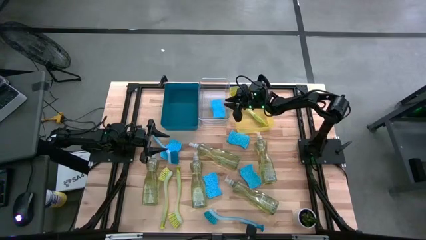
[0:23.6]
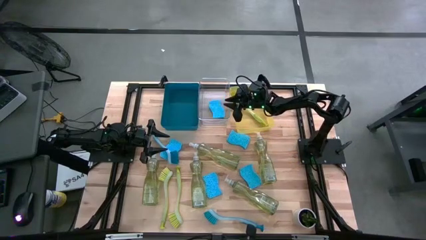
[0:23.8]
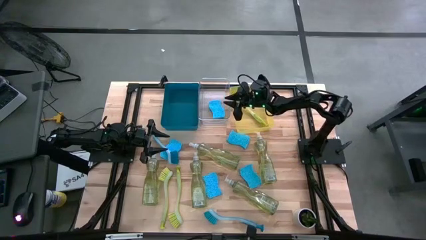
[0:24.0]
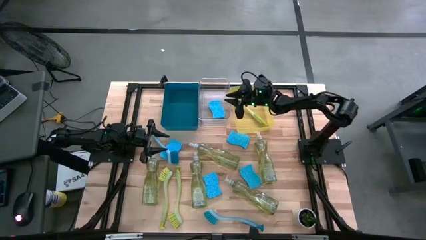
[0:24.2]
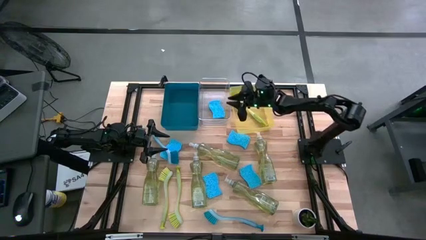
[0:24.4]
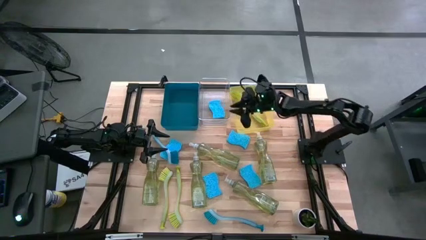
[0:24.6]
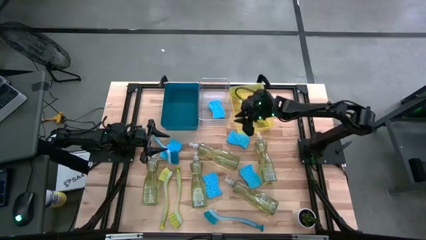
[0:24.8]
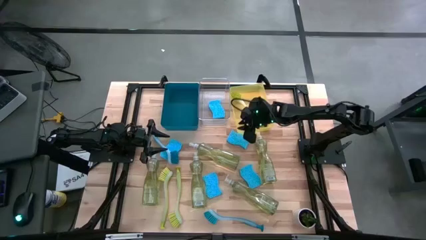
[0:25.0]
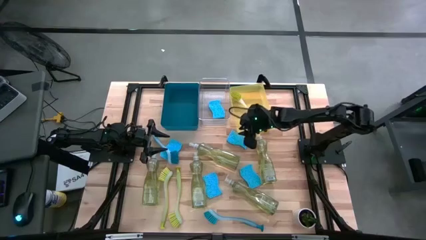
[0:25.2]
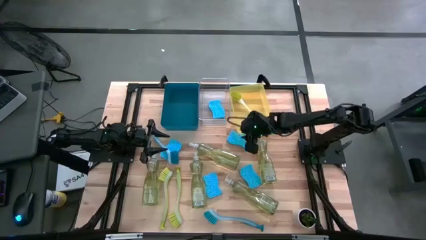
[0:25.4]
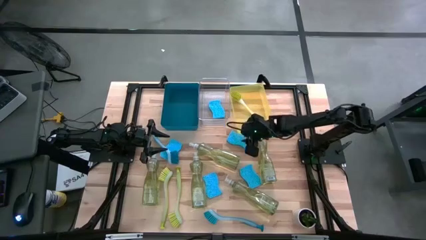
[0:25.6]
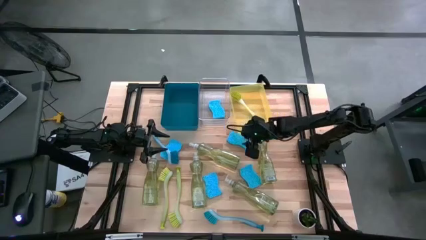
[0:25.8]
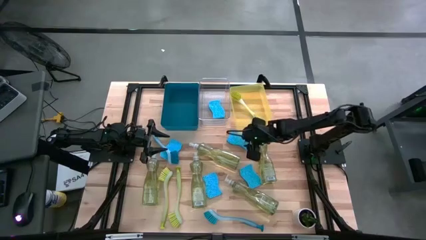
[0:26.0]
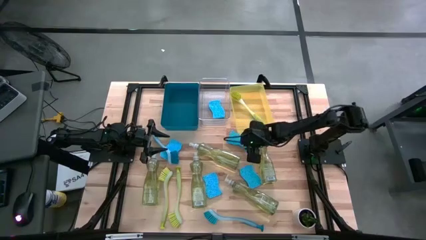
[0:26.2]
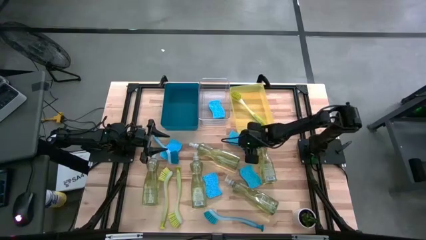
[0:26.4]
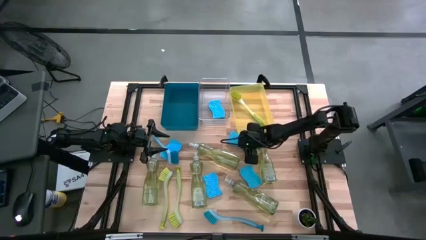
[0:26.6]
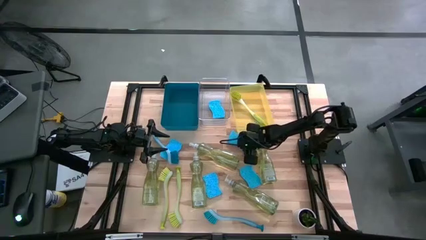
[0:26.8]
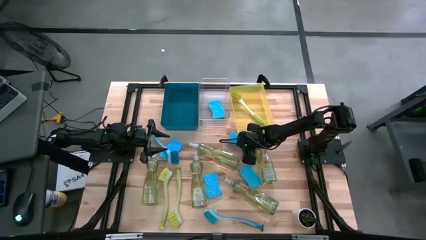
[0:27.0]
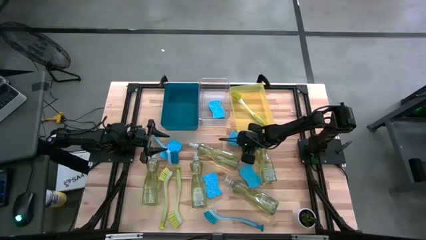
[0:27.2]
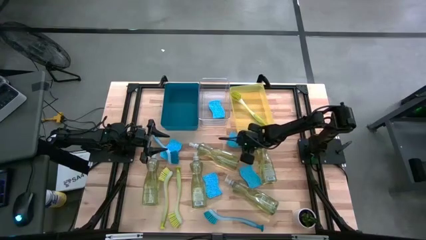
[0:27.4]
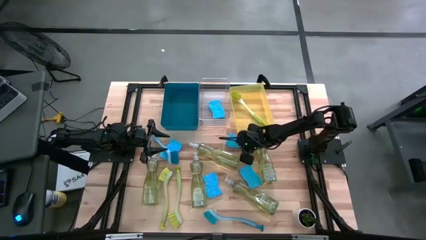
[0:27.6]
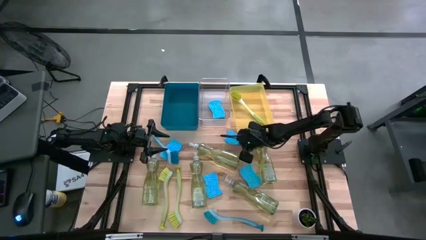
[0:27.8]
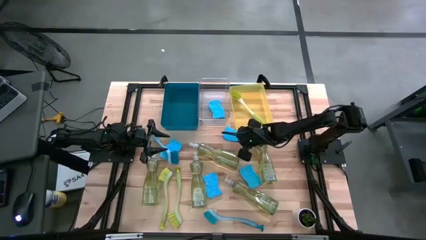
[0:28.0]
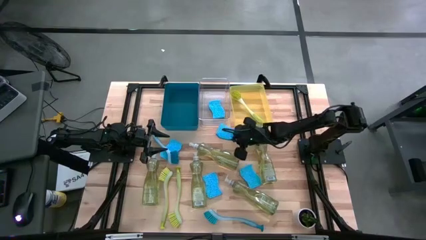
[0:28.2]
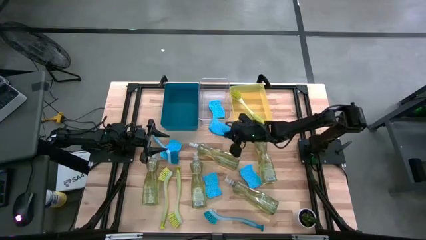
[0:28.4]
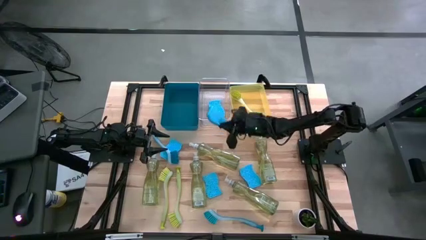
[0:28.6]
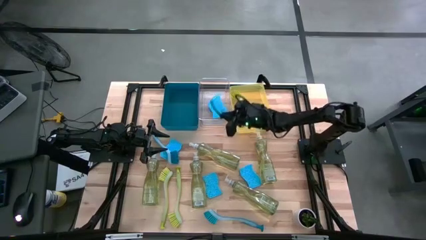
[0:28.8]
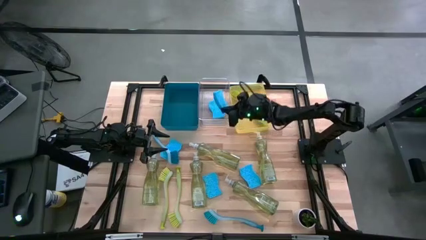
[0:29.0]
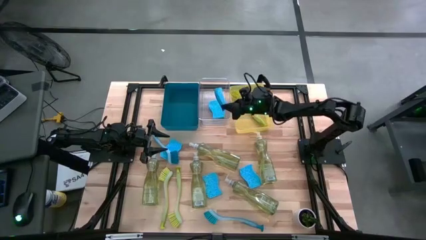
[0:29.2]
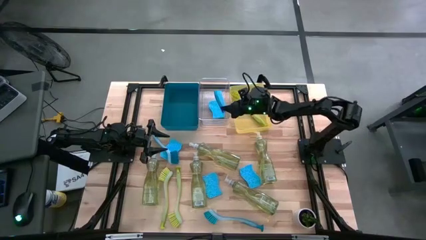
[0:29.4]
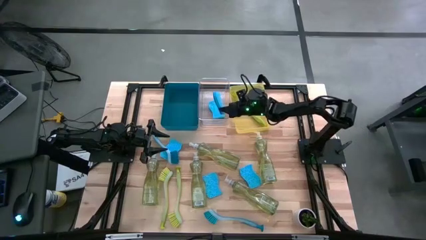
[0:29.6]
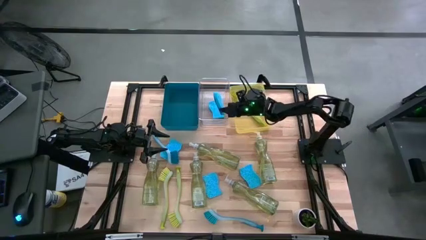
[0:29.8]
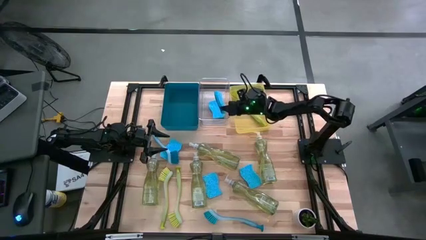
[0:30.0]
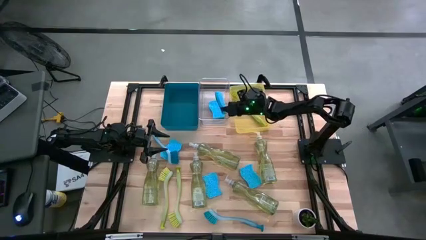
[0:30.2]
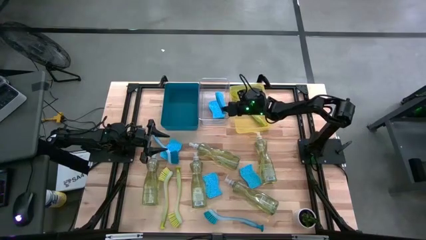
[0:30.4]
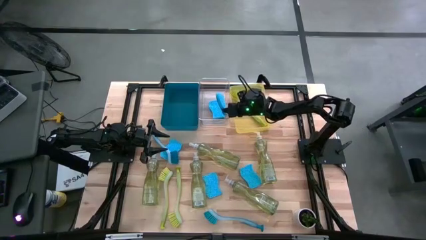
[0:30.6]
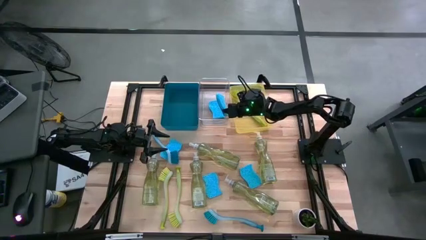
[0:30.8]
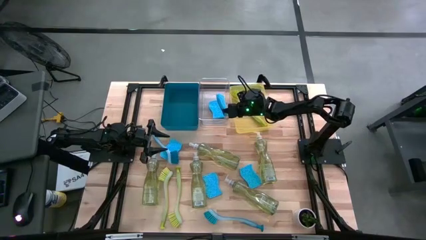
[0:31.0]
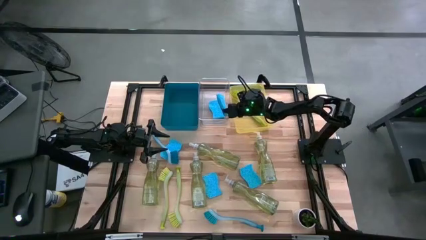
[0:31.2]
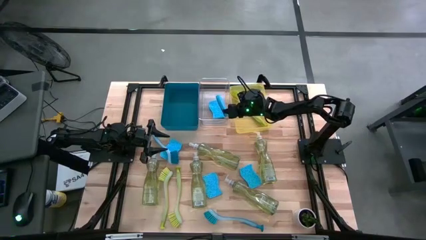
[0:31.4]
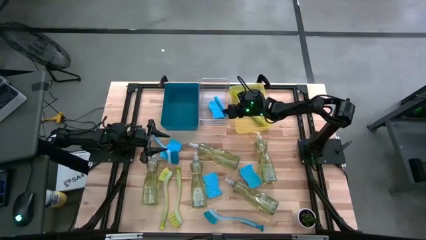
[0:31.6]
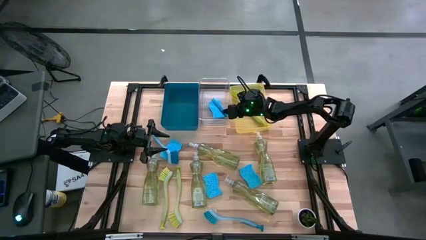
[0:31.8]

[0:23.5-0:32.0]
Task: Pick & Place Kitchen Sink Supplies
Put the blue sponge into the transparent bin

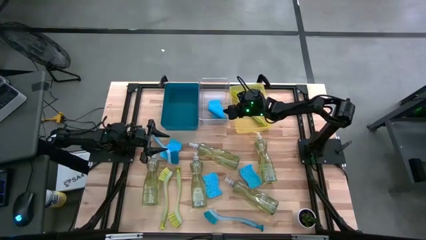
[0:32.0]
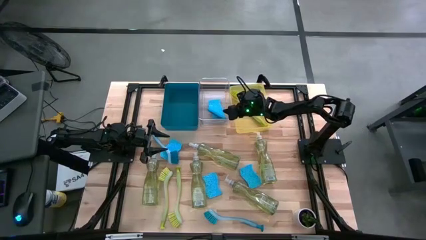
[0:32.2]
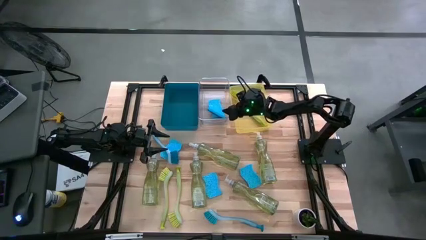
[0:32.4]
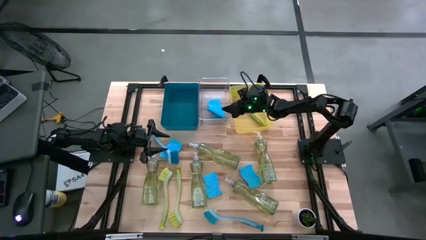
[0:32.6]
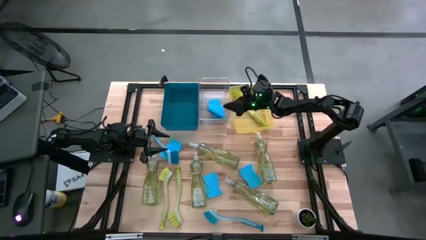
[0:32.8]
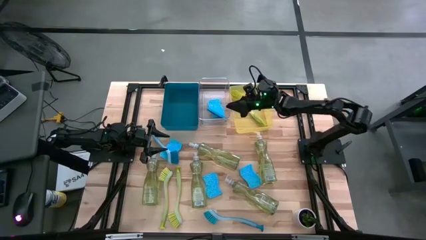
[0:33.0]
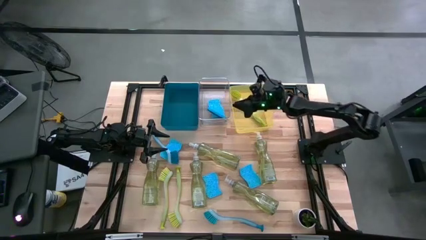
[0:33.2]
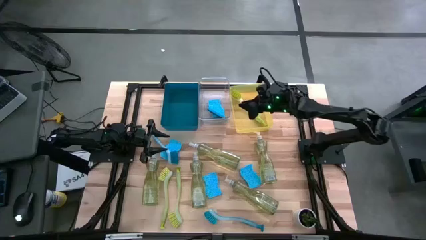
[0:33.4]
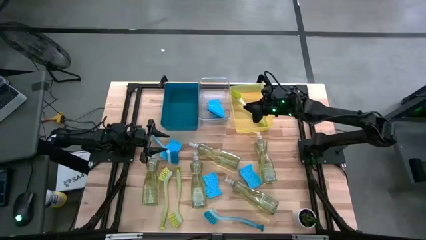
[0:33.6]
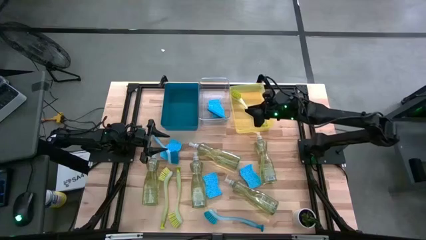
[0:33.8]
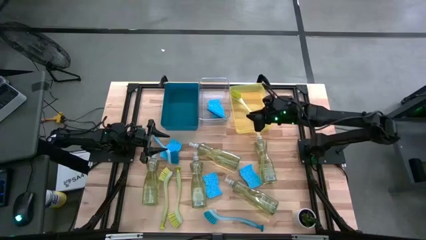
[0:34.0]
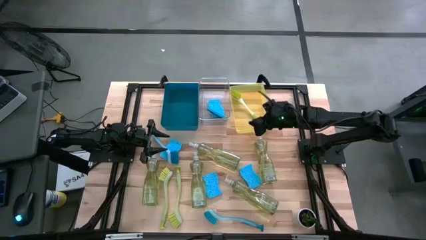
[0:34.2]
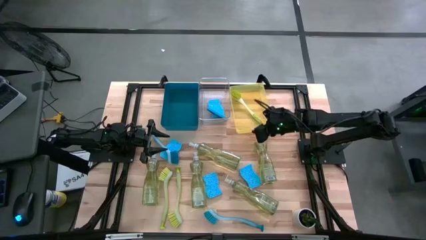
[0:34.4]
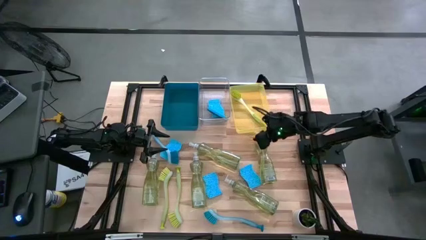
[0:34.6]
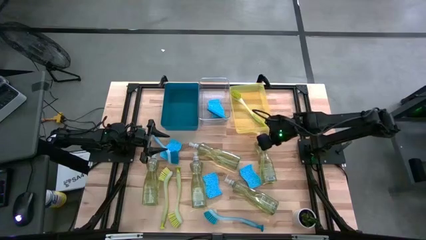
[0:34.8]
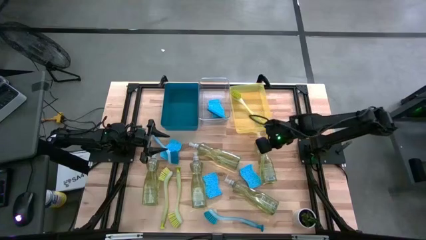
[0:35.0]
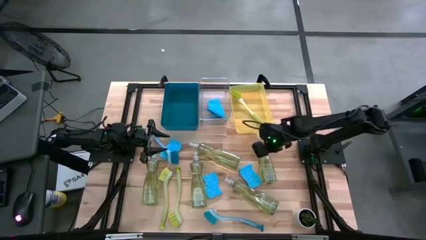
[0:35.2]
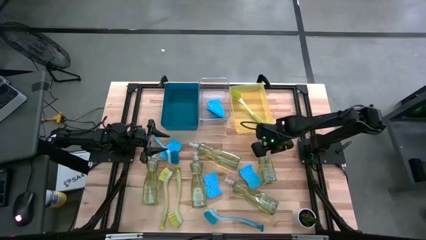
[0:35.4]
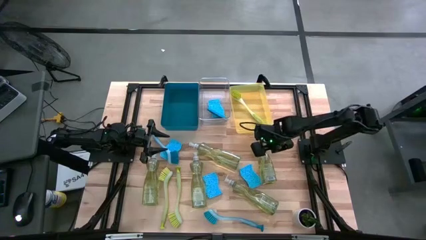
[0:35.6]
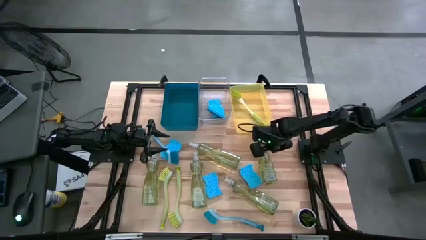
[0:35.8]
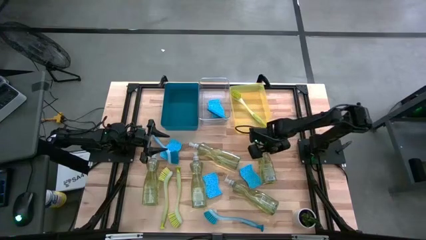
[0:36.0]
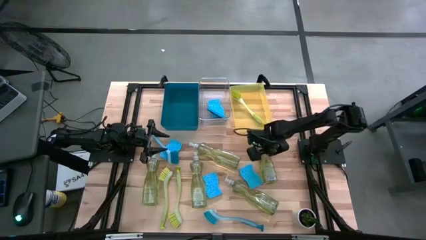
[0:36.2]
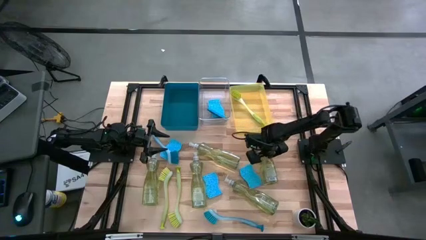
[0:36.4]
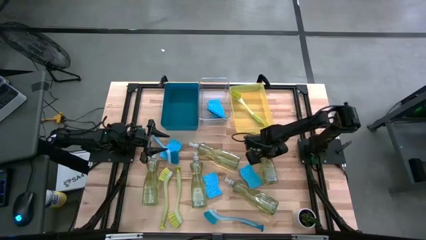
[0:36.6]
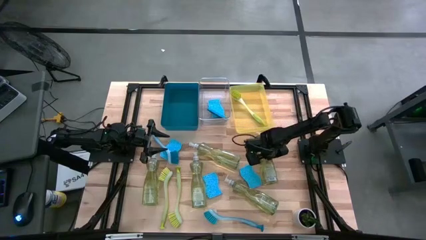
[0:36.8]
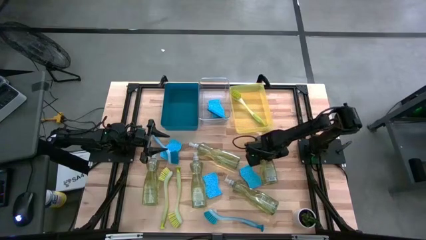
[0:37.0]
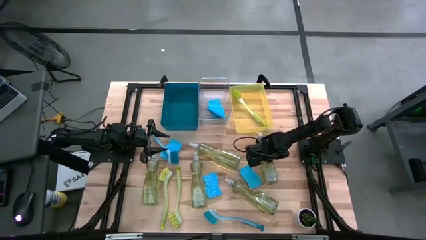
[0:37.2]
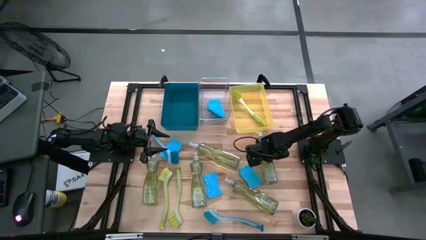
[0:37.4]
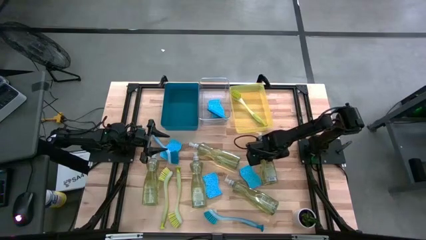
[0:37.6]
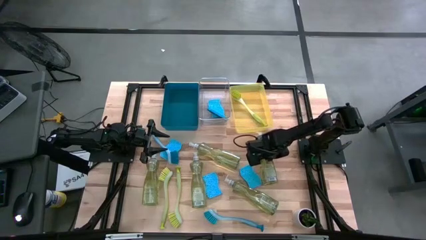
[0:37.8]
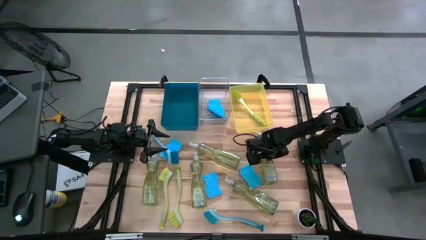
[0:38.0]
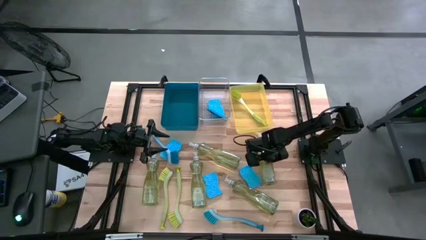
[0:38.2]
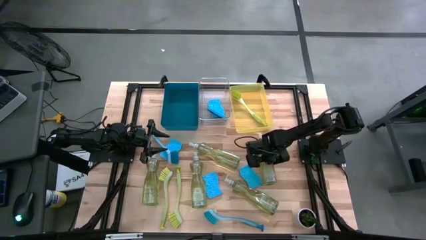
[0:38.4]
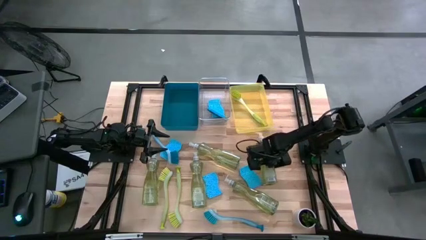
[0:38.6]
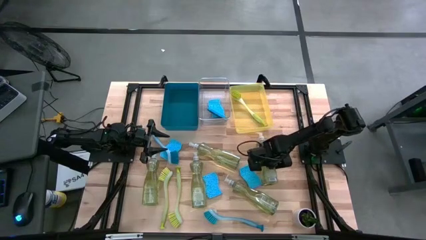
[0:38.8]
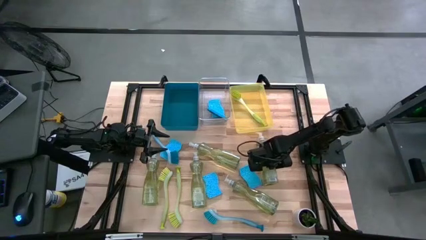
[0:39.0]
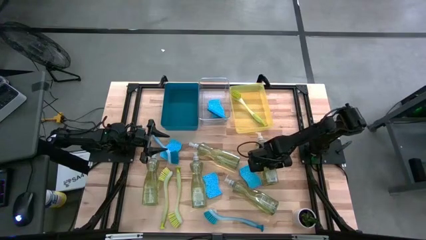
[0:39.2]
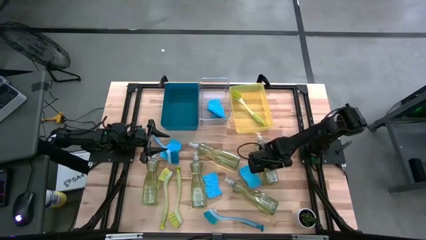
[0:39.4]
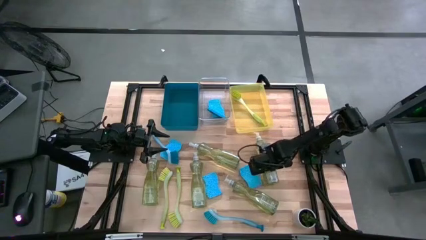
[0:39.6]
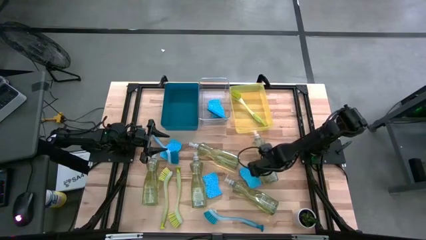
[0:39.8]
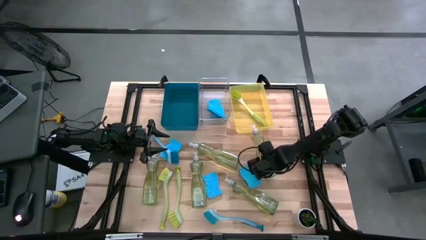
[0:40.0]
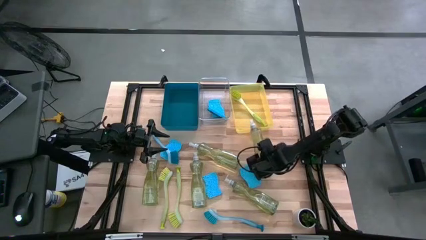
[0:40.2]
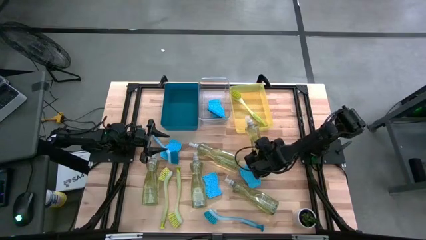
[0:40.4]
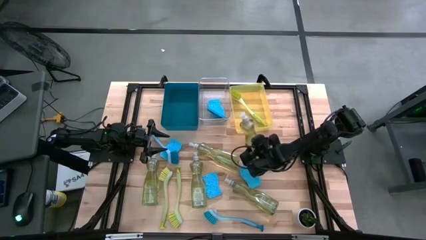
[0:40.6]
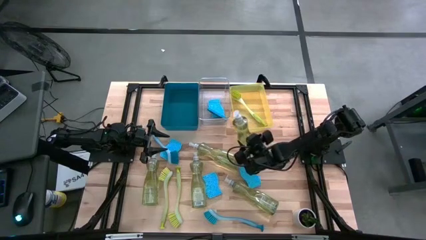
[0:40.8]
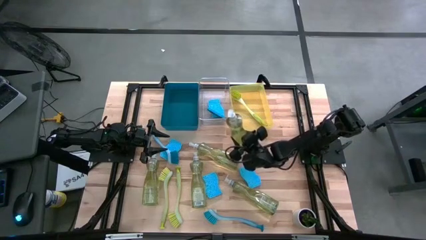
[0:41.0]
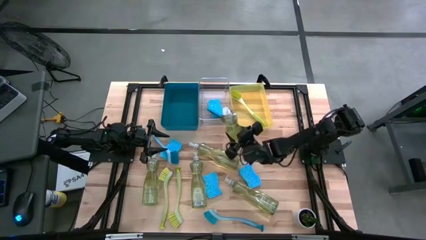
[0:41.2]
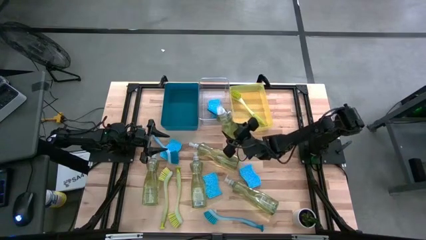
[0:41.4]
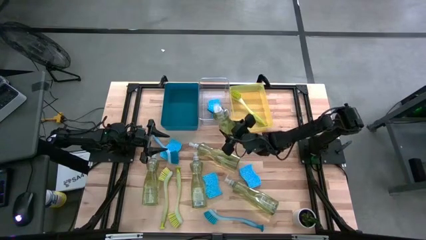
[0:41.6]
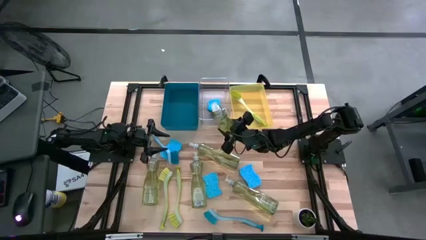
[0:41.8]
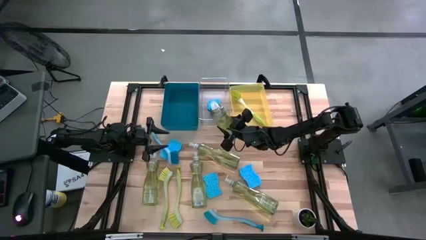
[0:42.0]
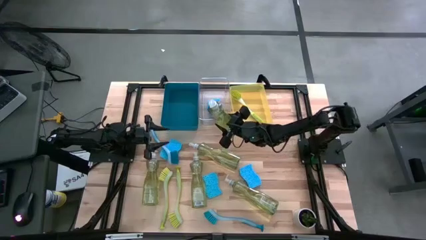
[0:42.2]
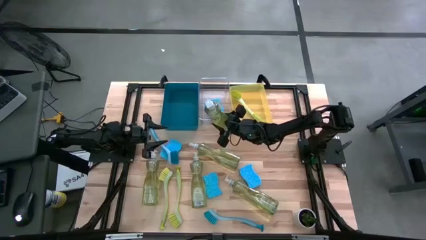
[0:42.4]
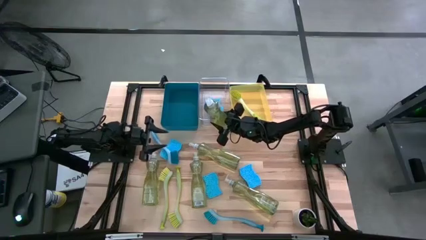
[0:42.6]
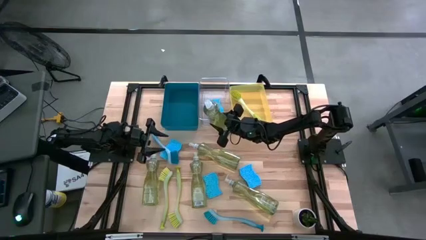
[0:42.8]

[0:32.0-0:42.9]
Put the dishwashing liquid into the blue bin
